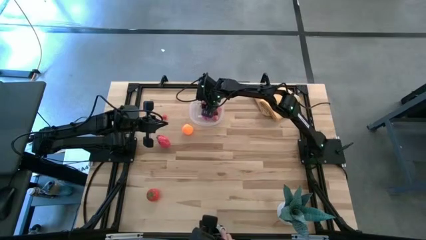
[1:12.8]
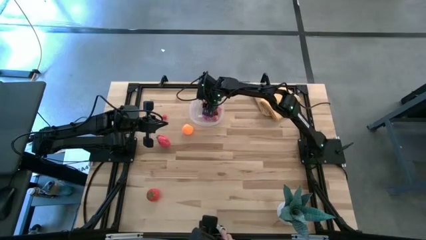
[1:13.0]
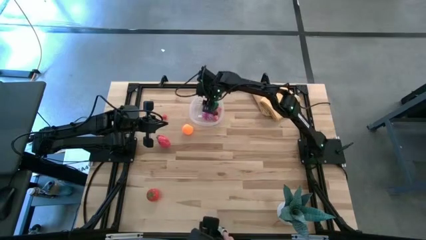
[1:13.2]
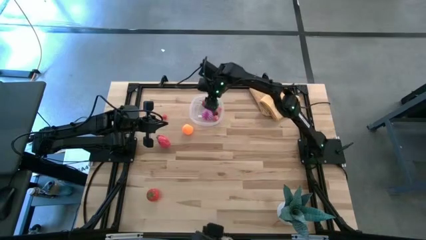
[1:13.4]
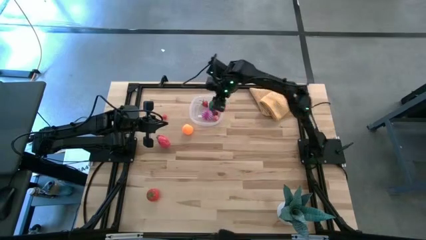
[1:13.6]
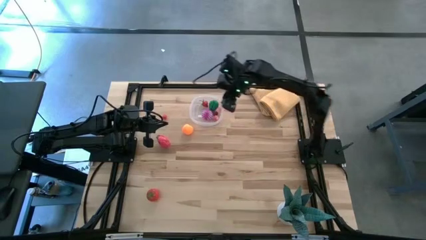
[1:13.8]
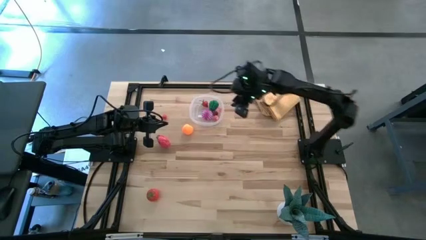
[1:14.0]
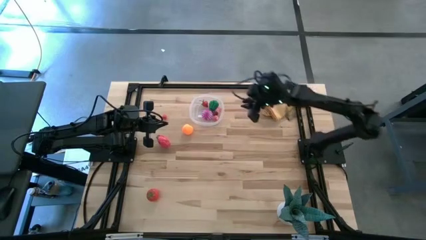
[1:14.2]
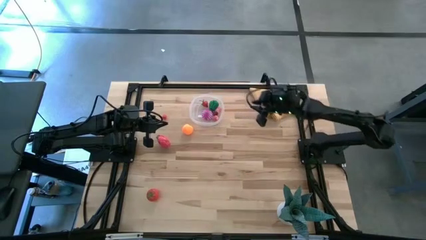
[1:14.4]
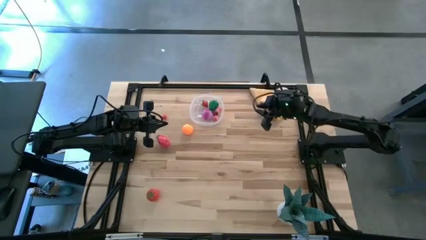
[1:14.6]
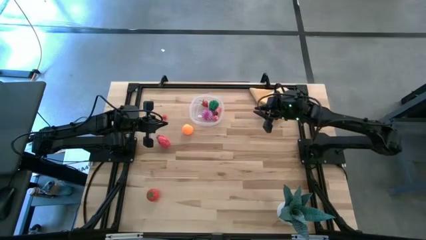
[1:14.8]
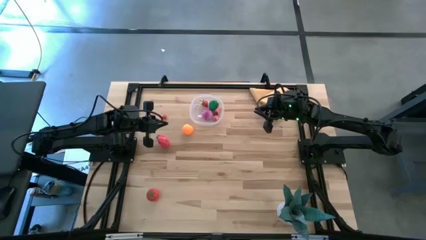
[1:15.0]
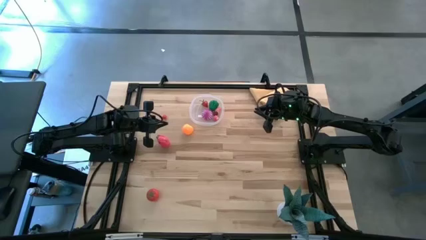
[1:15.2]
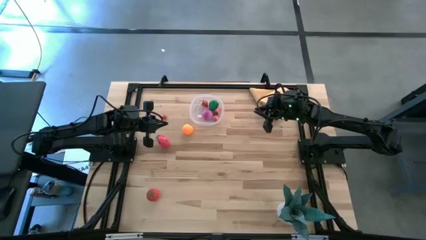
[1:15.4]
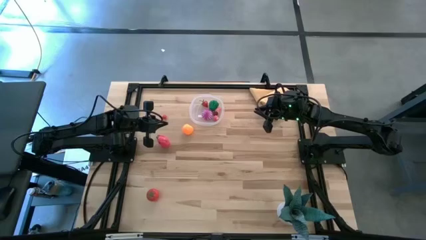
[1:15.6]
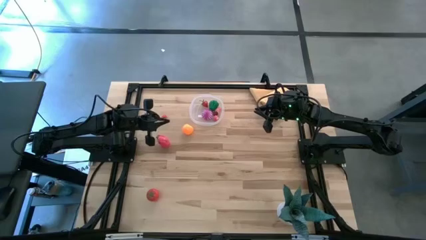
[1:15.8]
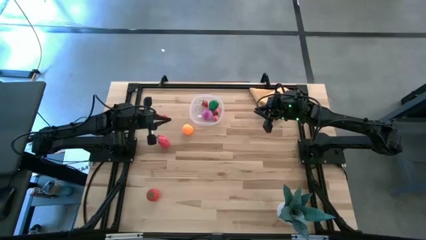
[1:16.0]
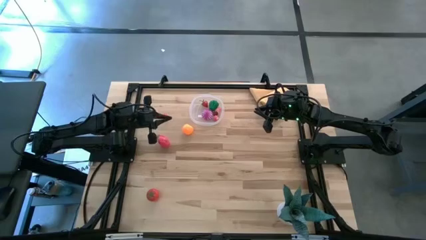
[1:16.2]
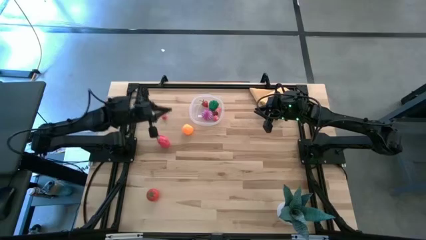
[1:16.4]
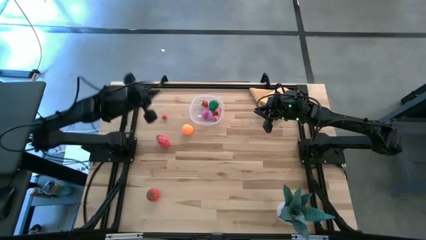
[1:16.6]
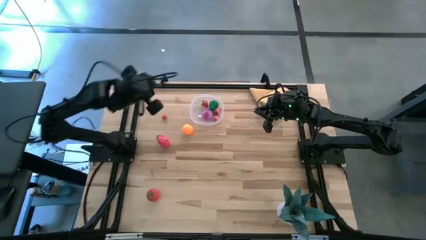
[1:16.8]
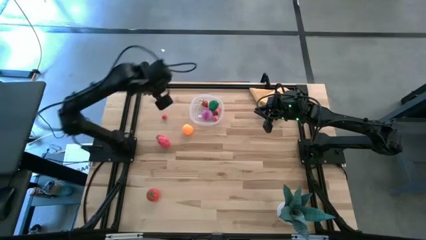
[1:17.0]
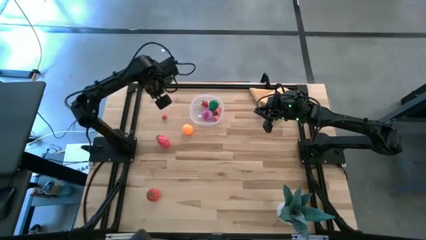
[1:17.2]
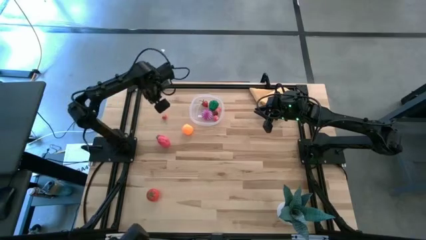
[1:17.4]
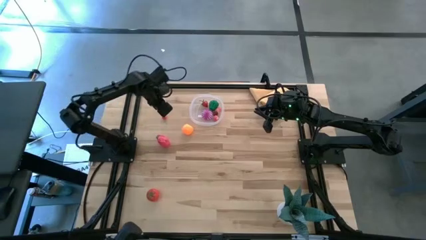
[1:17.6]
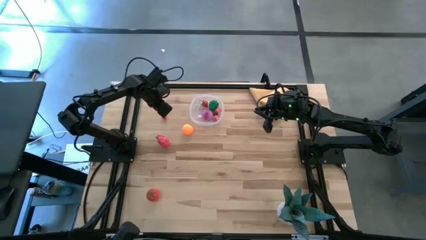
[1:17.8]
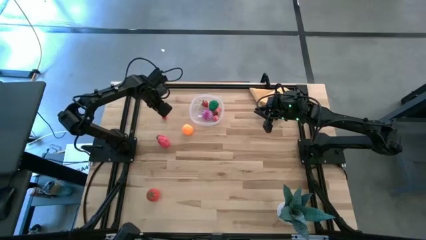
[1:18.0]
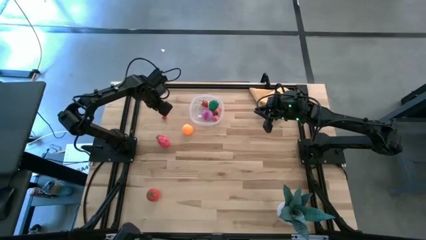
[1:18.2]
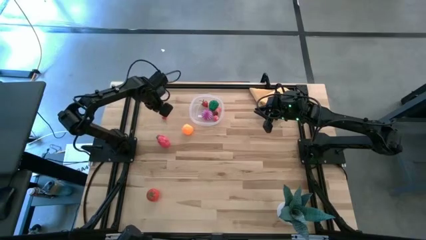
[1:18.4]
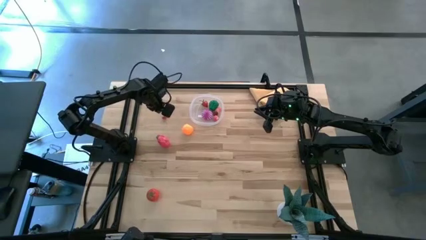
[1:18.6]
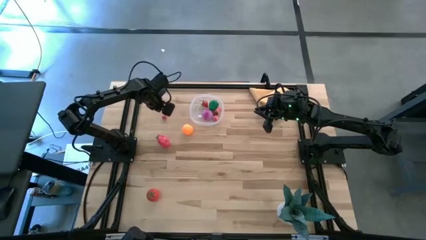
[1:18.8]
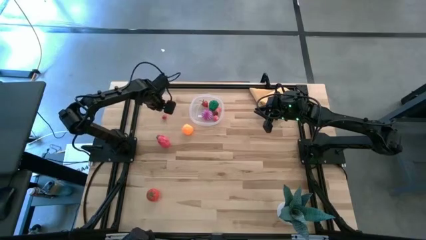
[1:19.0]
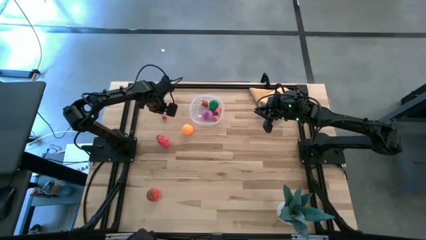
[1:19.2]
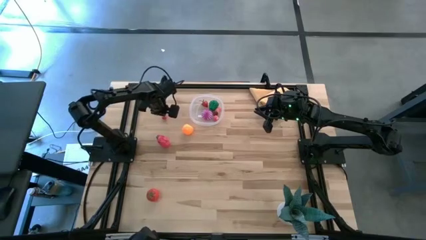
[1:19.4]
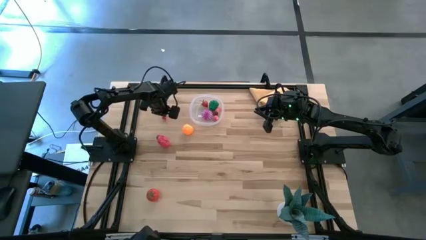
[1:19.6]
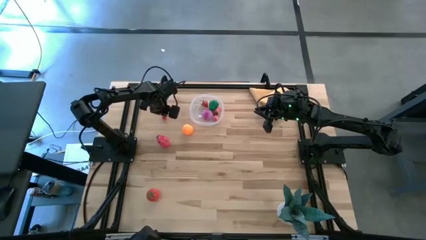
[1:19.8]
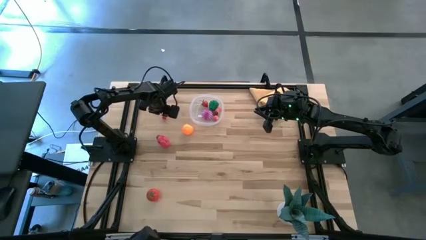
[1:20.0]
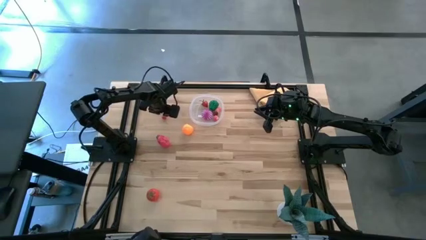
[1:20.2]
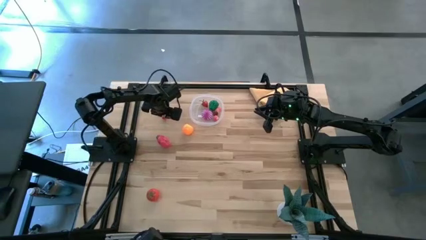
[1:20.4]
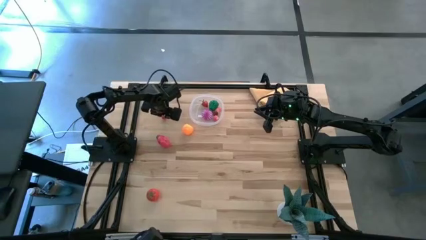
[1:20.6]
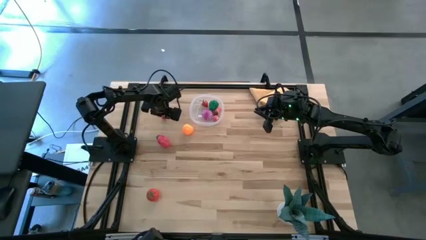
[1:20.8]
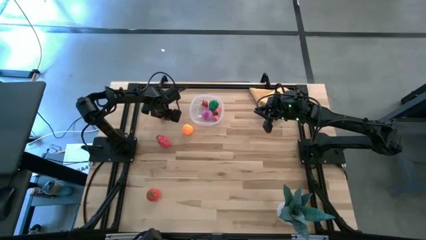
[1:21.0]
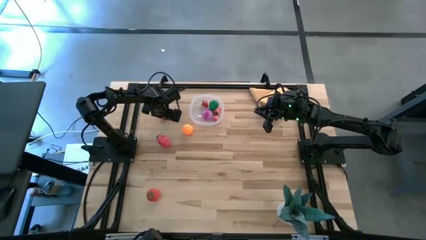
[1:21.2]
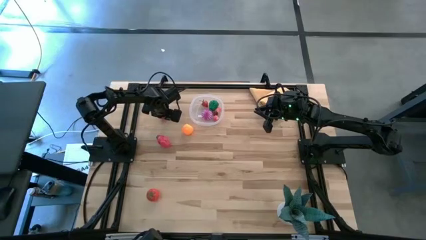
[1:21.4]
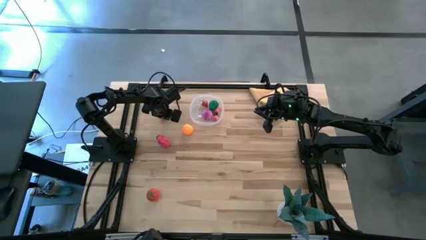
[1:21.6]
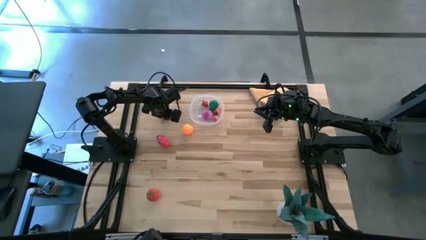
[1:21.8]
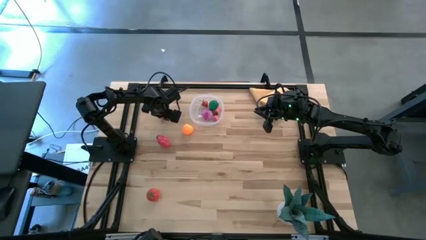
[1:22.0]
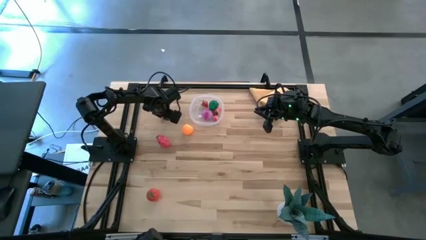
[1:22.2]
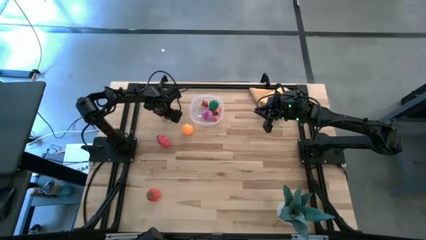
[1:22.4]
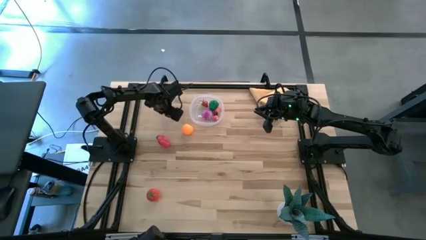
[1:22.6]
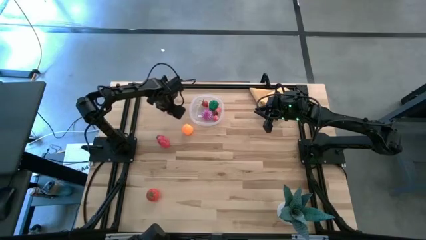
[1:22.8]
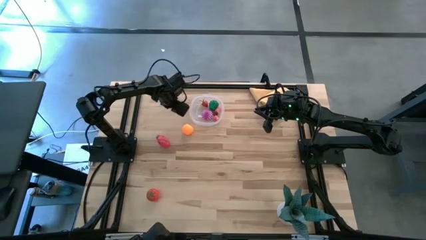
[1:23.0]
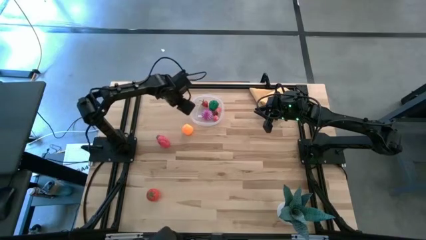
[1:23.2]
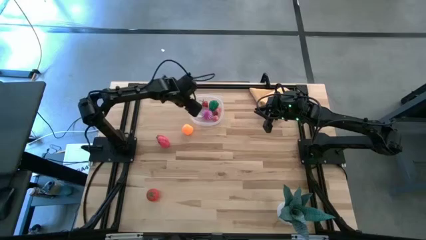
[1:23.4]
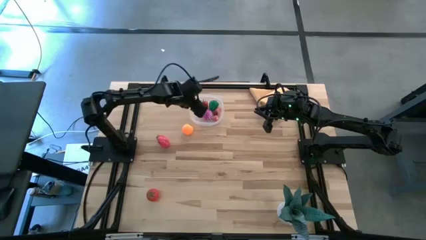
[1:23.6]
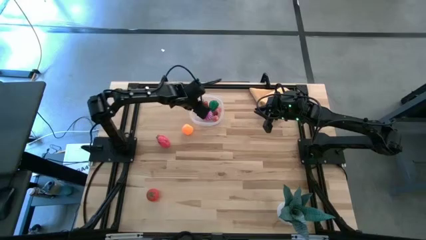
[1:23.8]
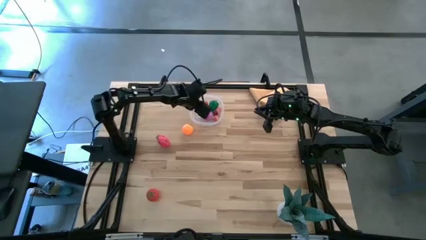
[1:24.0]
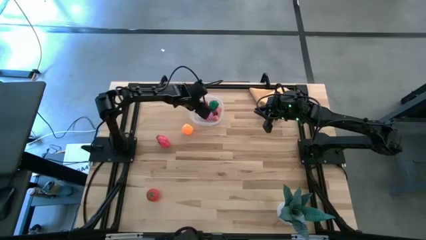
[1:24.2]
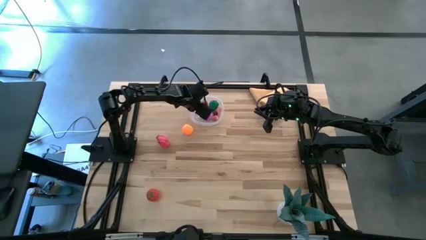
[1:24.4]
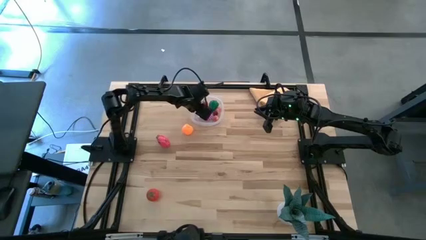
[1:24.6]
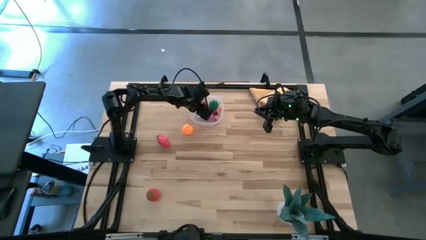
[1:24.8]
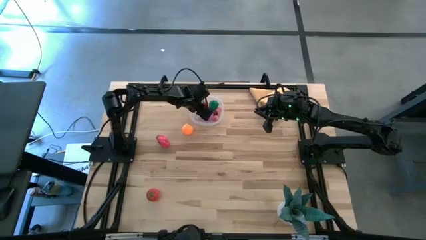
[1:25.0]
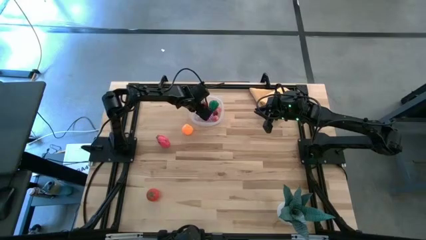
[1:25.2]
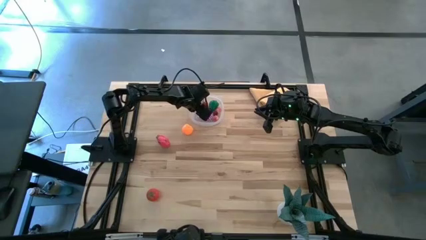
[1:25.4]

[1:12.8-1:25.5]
Task: Pick and placing Produce into tupperware
Put the red cherry into the transparent bin

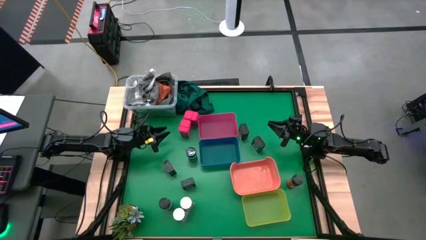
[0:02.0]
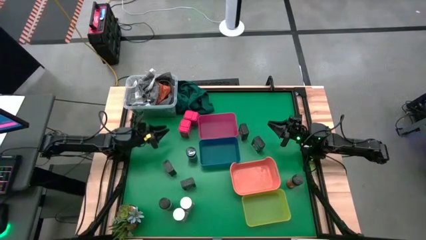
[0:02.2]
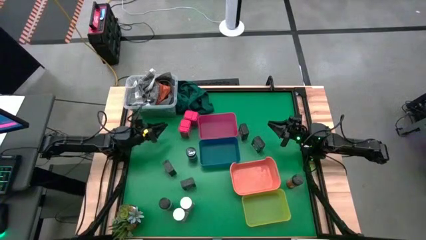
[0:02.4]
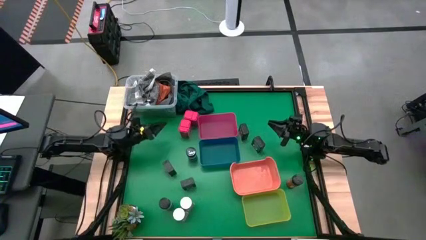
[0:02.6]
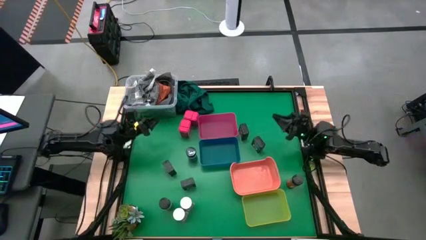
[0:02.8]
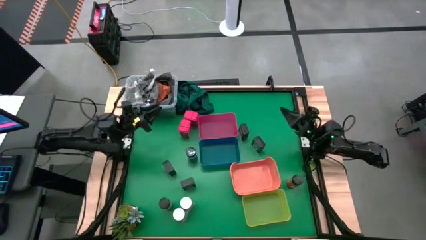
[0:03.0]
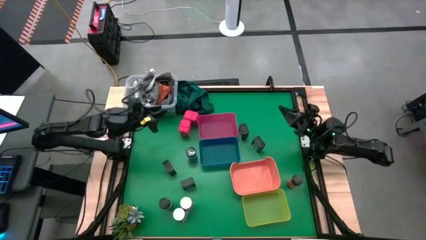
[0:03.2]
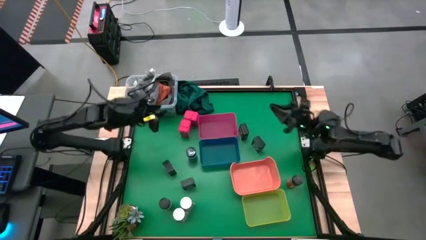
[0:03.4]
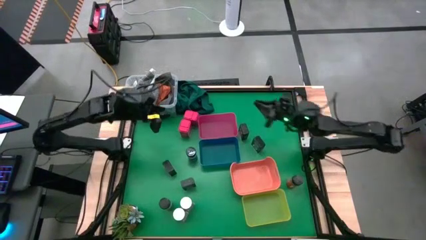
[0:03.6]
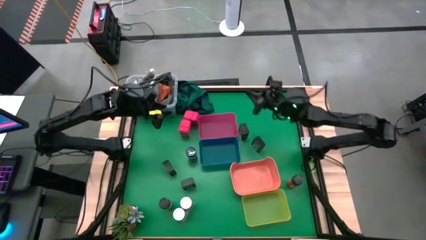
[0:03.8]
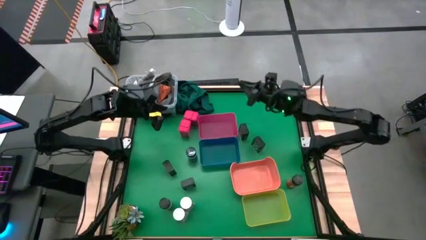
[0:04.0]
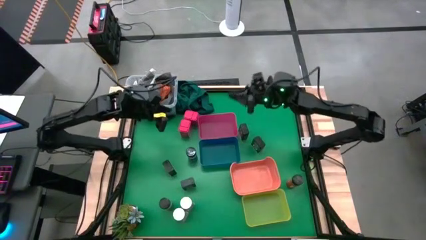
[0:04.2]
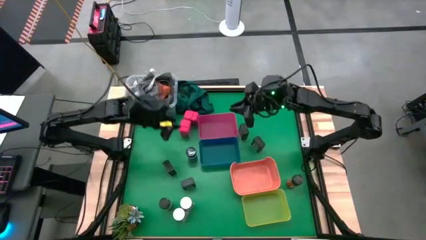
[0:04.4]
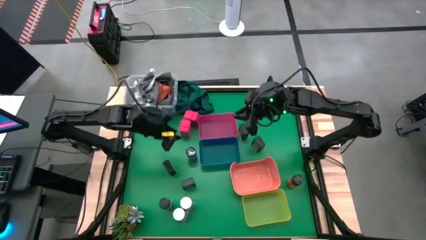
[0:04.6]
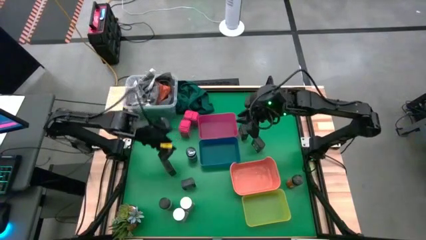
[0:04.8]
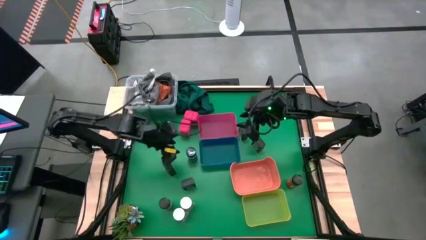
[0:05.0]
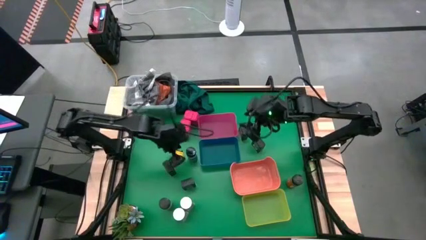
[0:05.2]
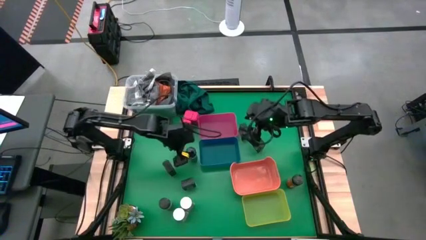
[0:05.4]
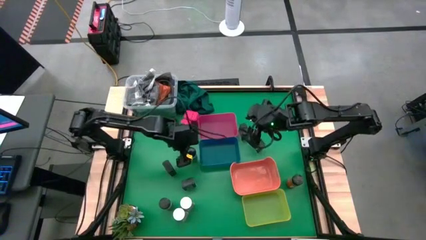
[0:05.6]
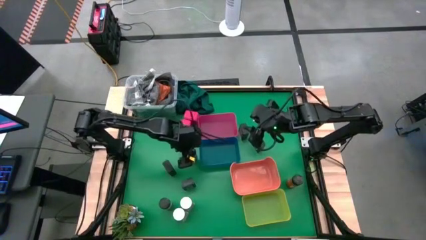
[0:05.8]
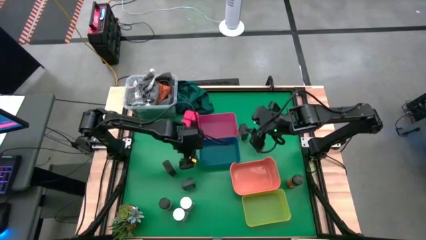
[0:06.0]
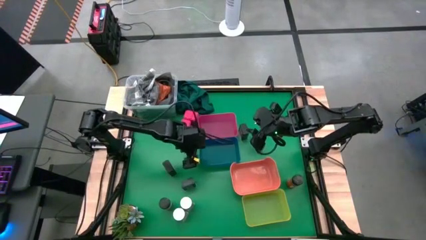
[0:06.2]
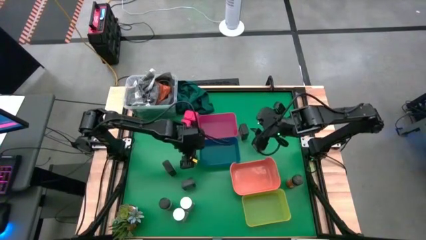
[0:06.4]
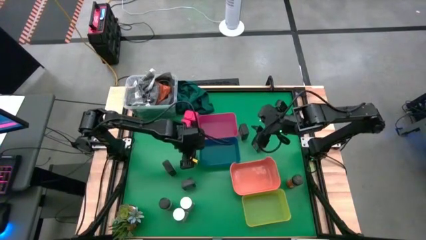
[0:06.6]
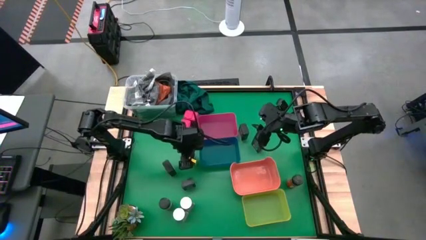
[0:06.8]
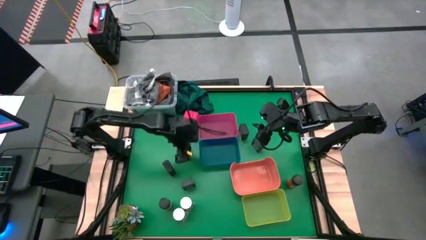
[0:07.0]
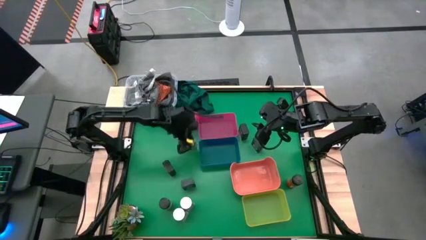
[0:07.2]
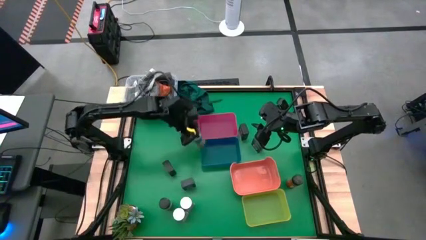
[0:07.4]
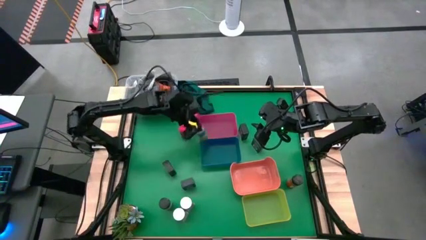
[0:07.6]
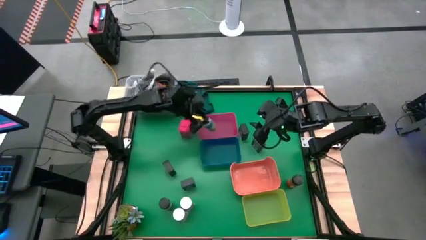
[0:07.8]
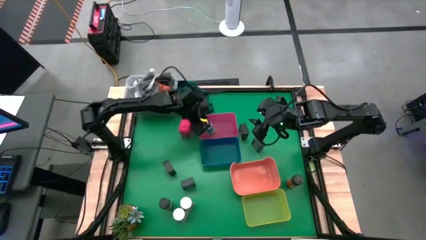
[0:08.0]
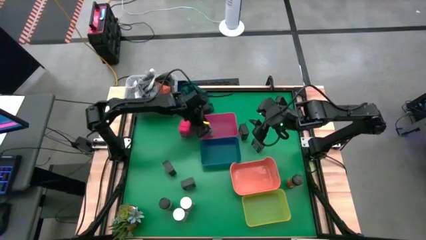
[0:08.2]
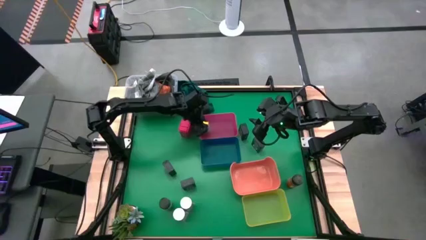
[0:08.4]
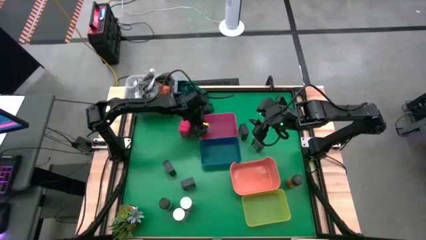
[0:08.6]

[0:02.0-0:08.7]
Task: Sort spices by type
Put the top left black seasoning bottle into the pink bin
